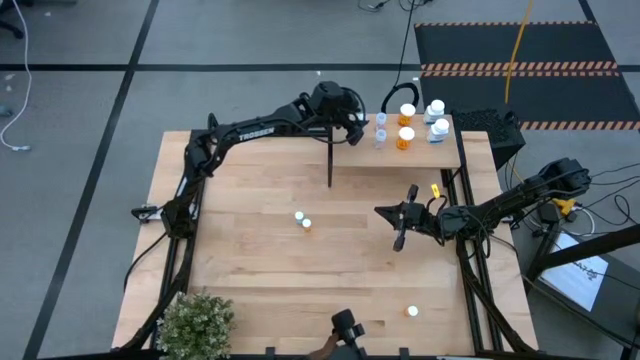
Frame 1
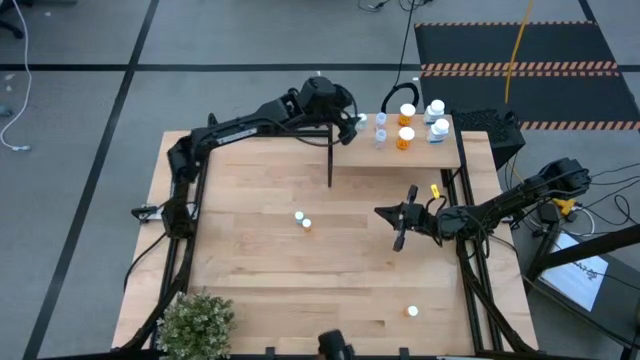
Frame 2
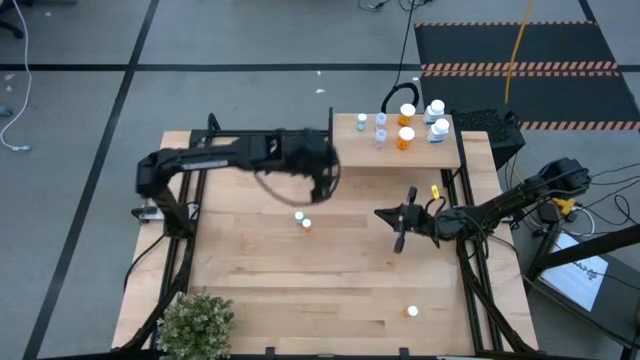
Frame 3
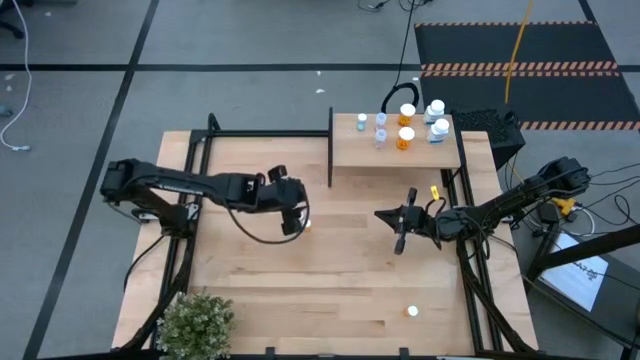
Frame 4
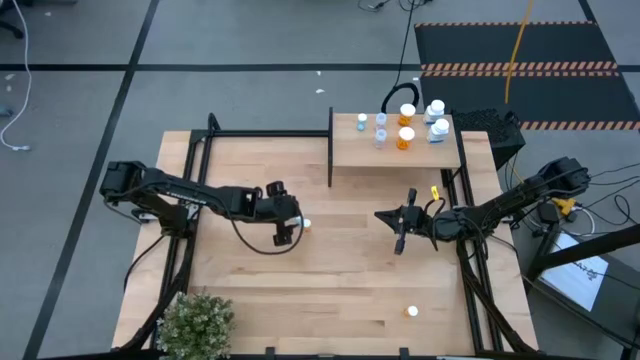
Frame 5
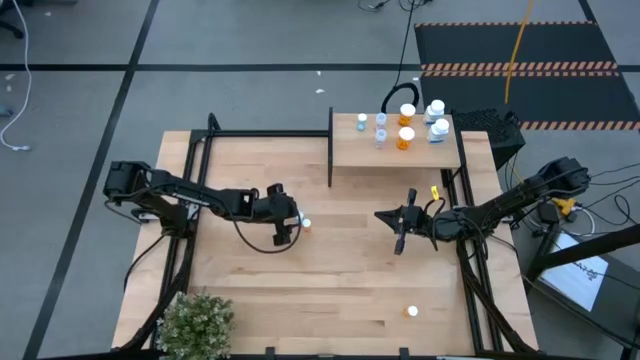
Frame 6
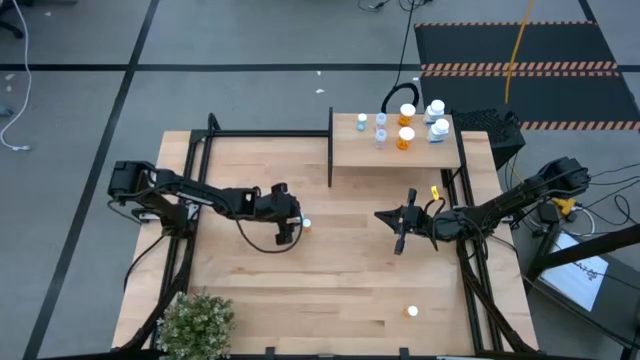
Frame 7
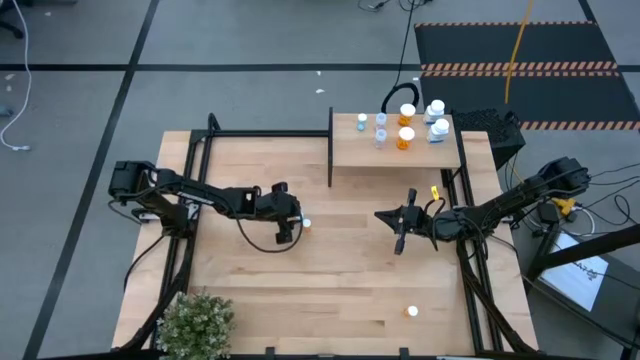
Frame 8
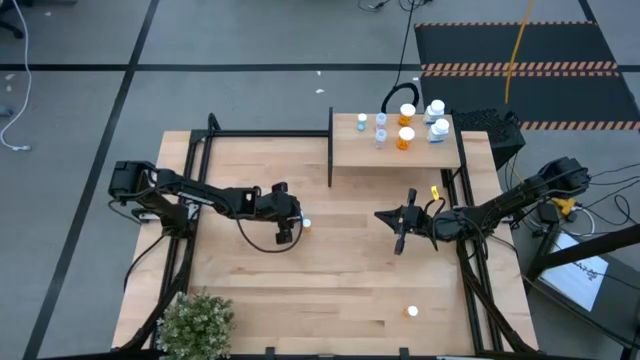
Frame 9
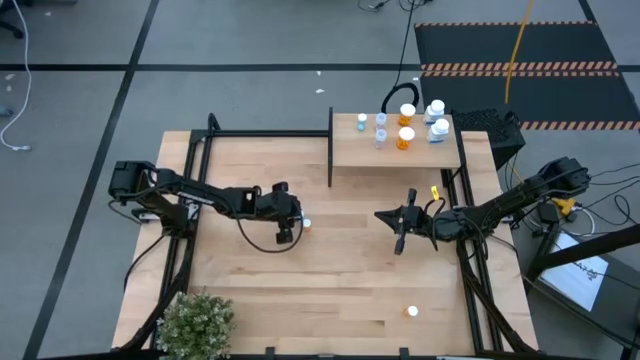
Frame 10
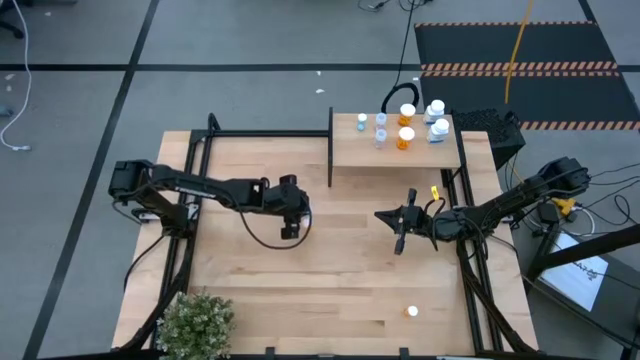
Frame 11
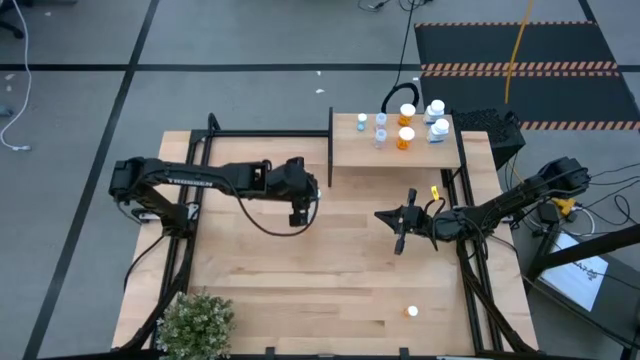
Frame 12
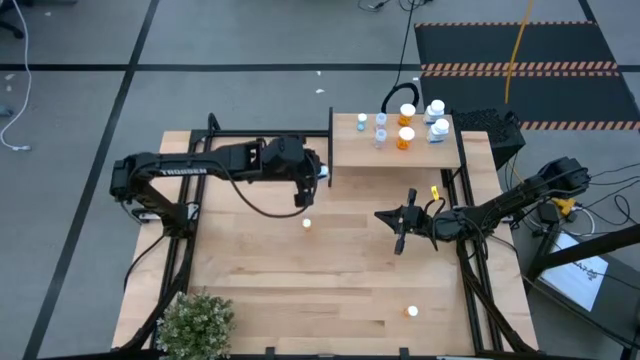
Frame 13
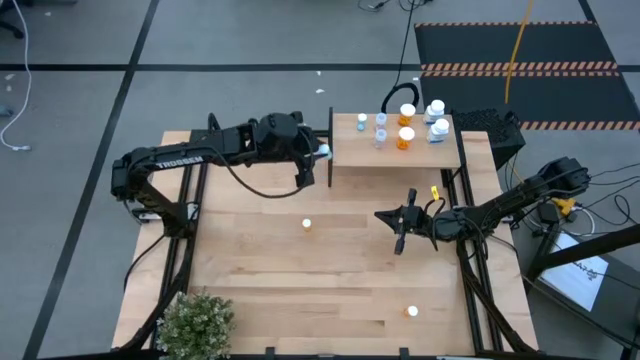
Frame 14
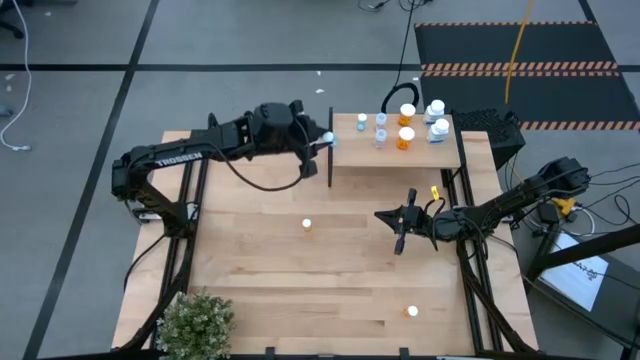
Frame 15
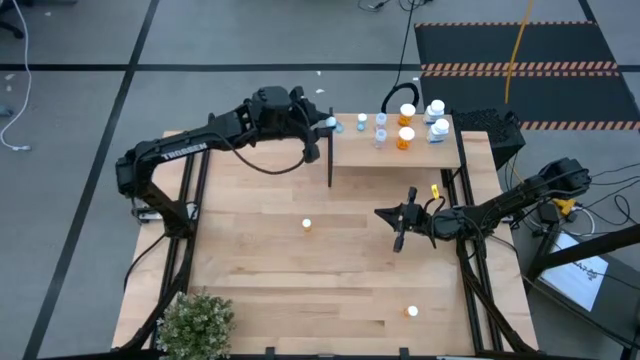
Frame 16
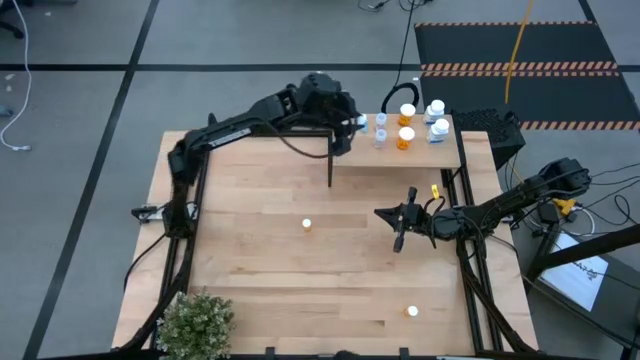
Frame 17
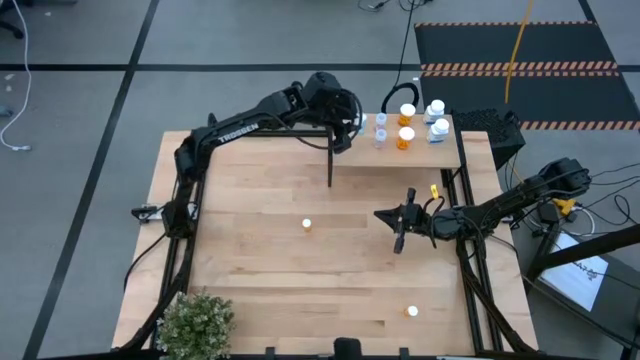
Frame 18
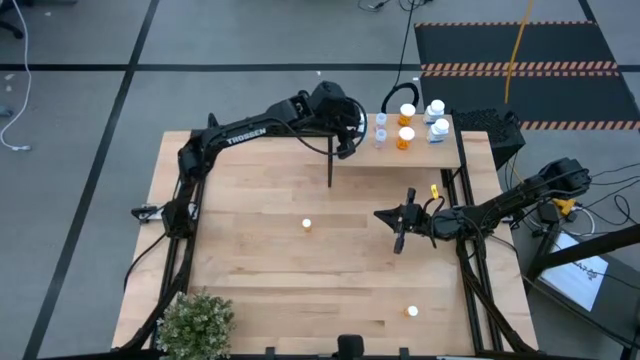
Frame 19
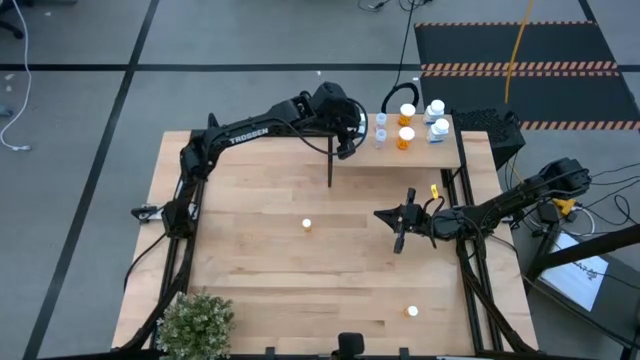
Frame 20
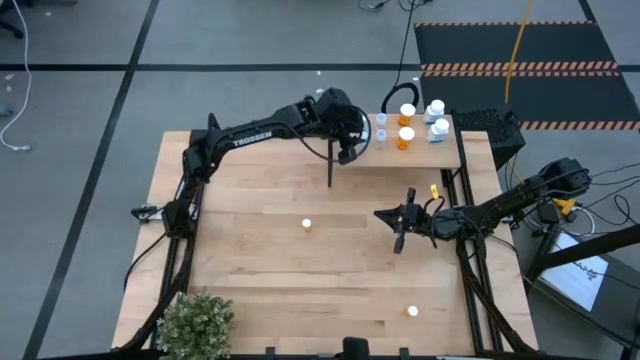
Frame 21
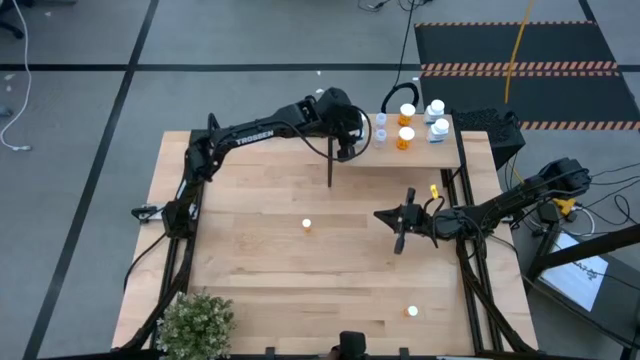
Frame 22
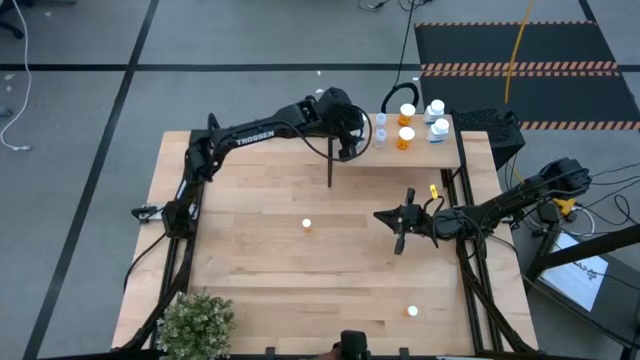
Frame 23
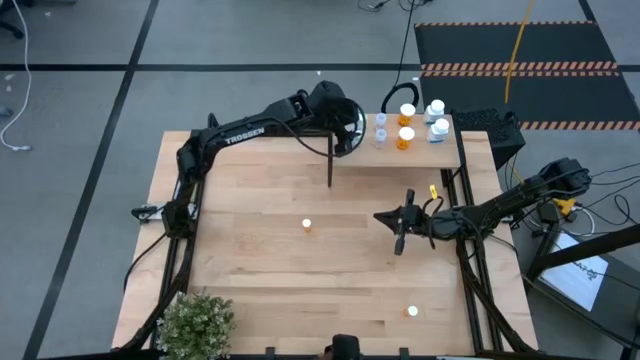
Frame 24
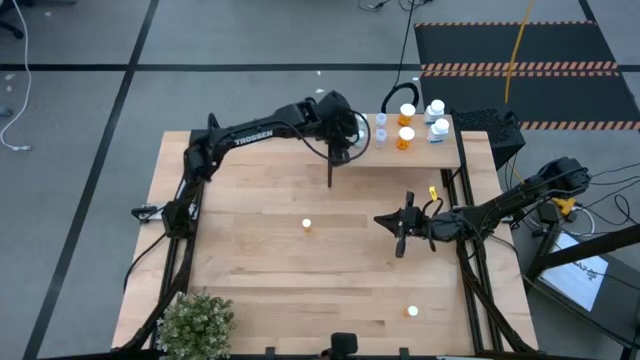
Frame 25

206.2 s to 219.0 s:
Task: Pick and place medicine bottles onto shelf by color
Put the blue pill bottle on the shelf aligned with the other blue pill bottle

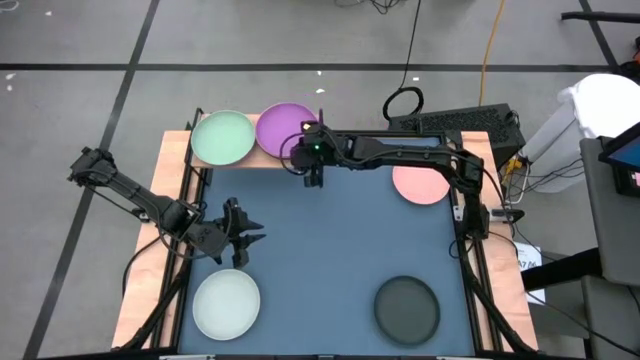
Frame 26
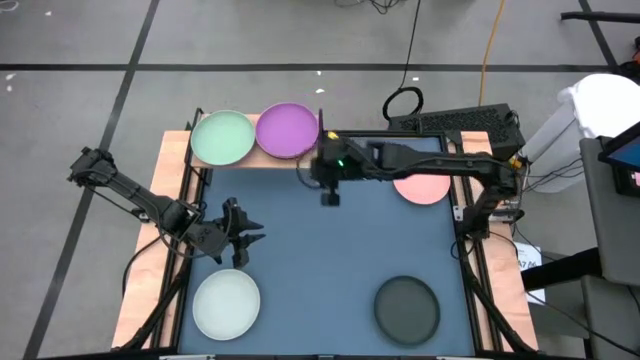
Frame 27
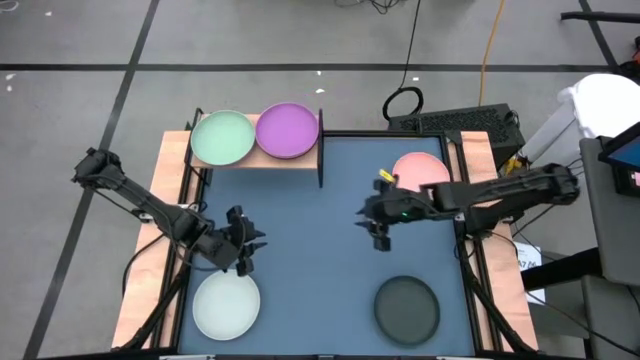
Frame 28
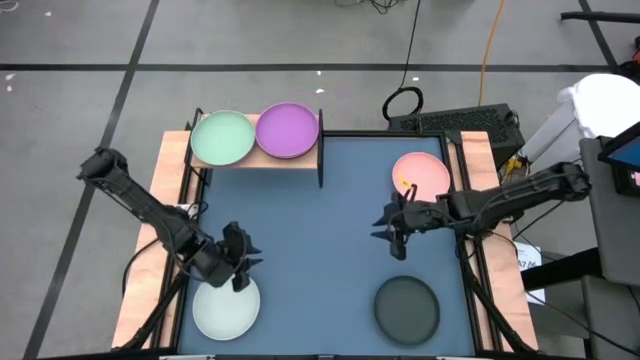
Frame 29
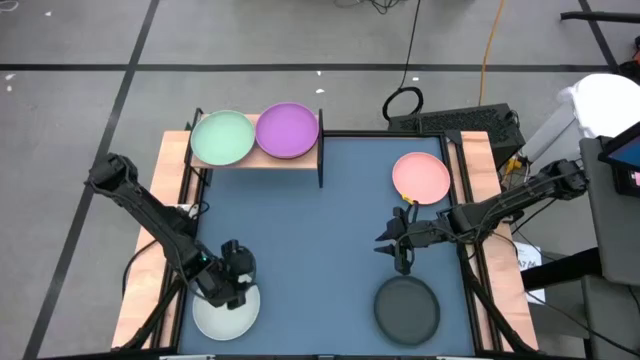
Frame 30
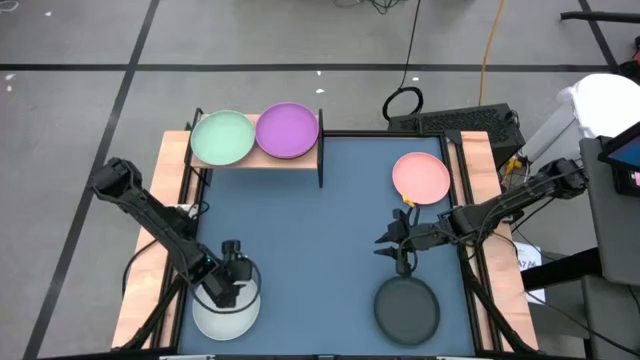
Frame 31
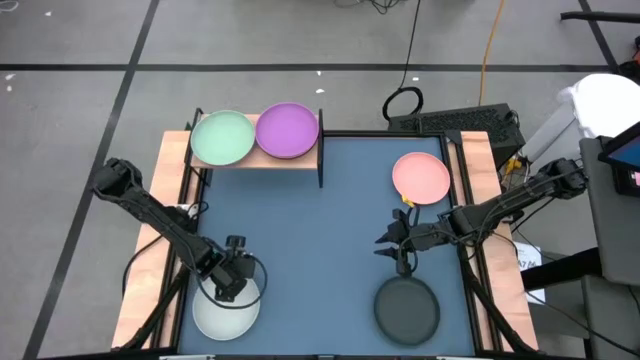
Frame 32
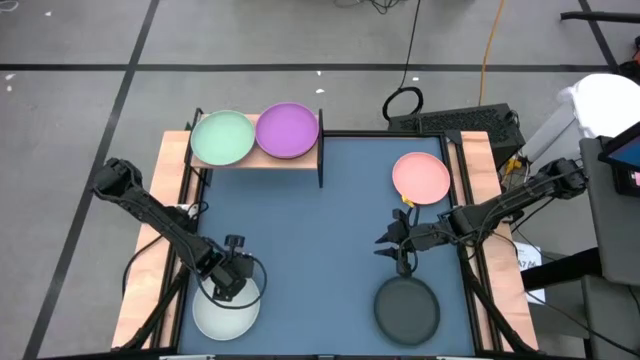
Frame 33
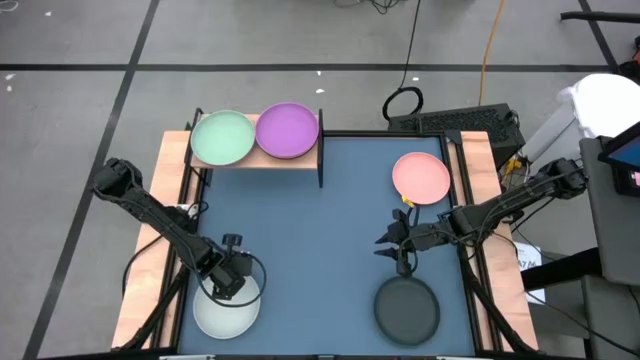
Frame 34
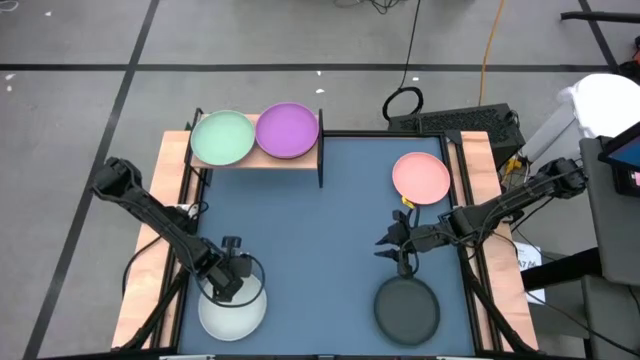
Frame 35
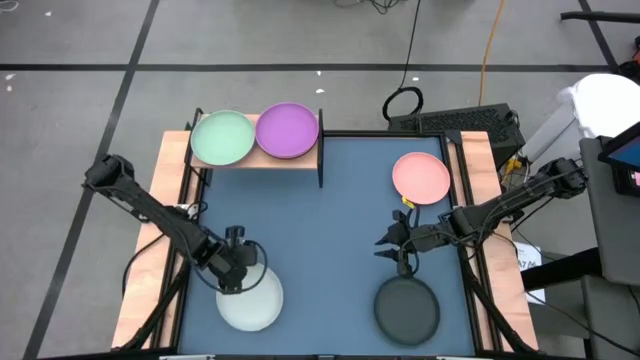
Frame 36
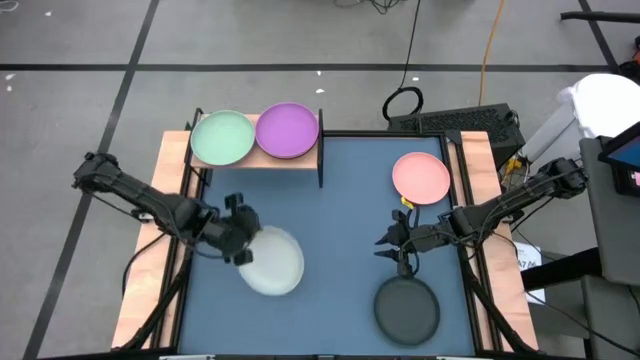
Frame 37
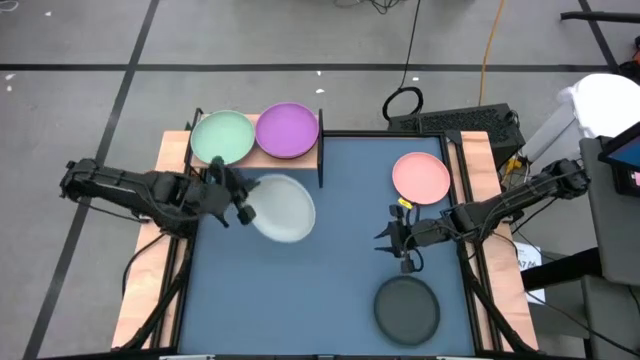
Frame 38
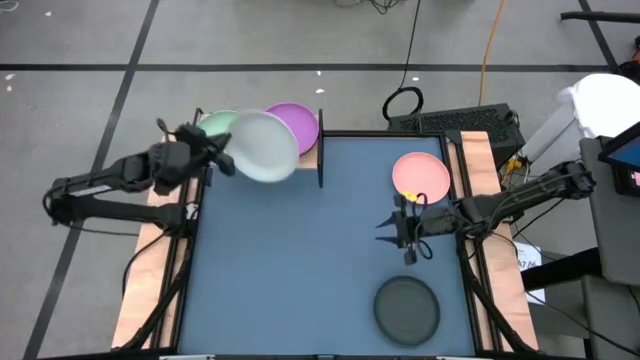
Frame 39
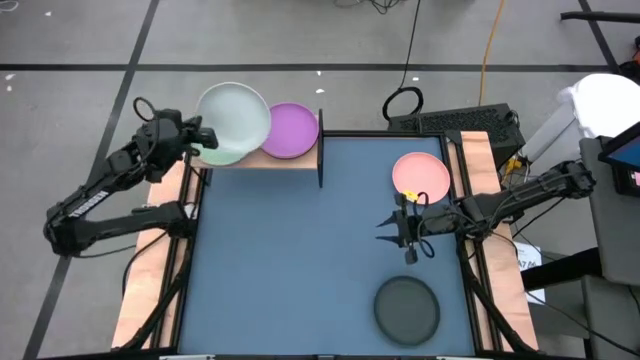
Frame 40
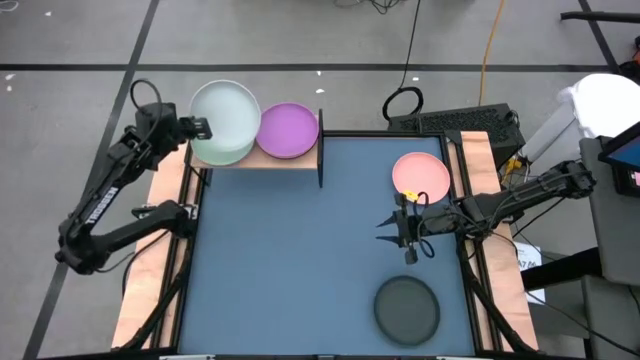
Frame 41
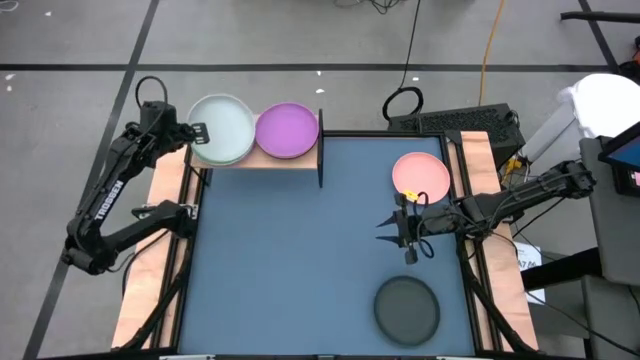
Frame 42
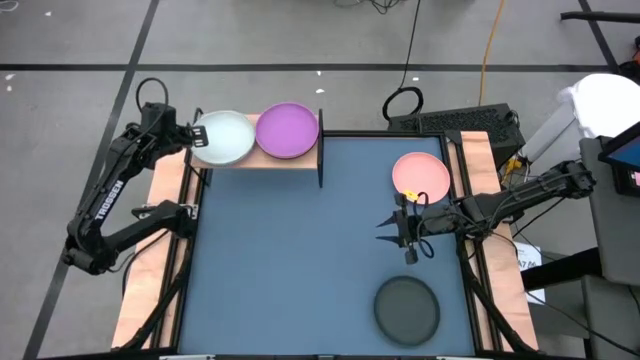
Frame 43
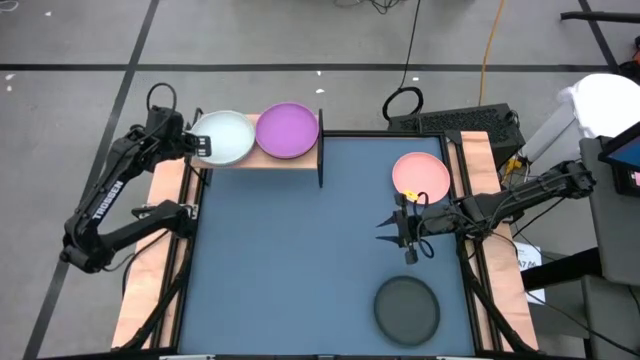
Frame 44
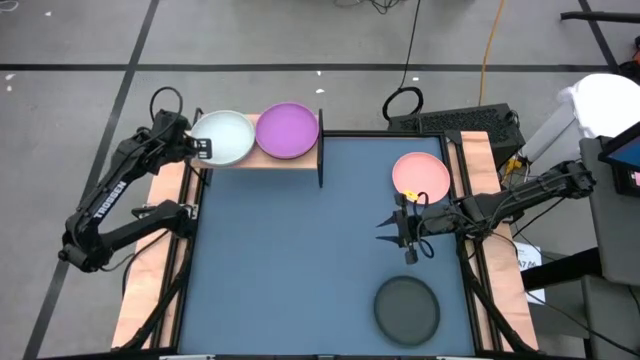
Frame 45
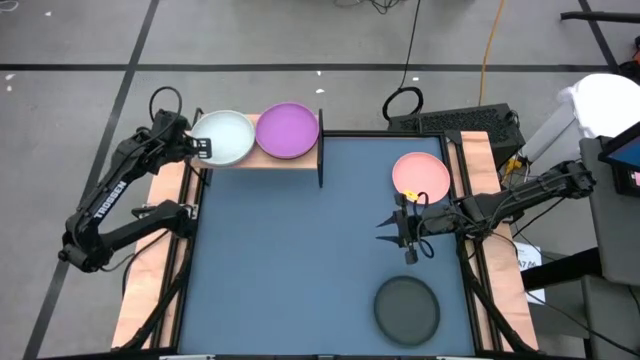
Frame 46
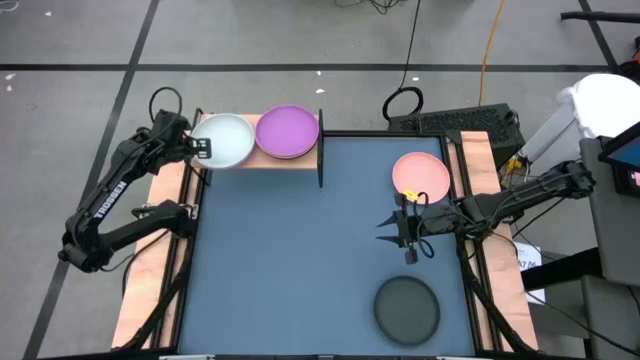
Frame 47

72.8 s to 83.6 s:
Task: Place and stack plates onto a shelf
Stack the white plate on the light green plate on the shelf
